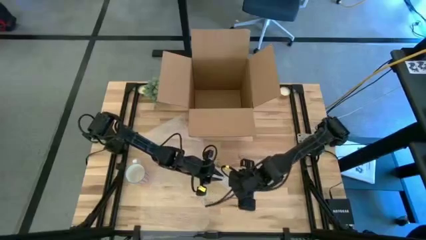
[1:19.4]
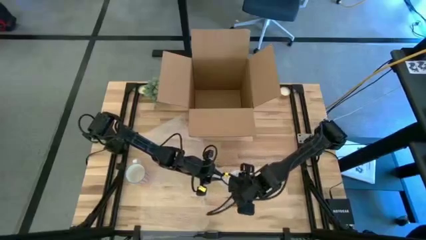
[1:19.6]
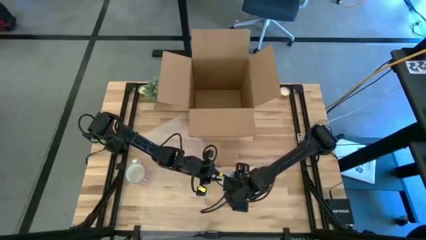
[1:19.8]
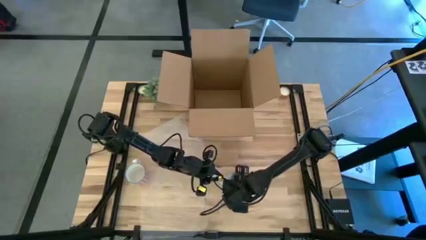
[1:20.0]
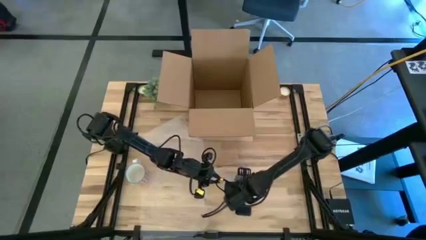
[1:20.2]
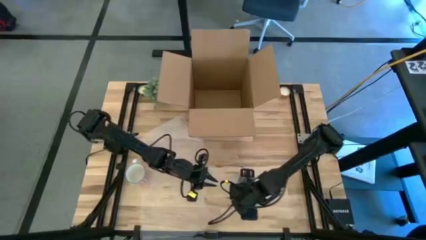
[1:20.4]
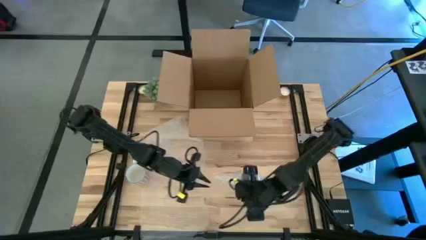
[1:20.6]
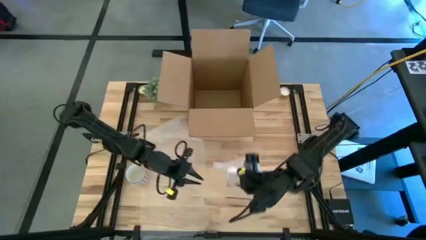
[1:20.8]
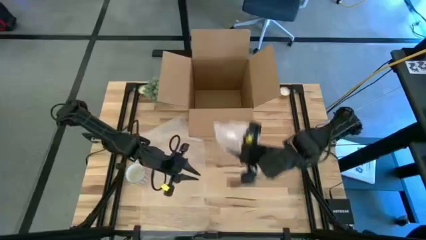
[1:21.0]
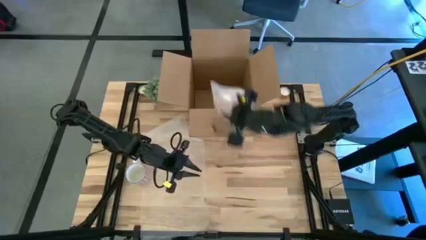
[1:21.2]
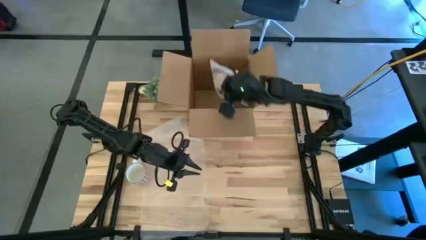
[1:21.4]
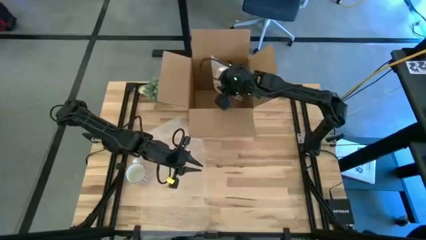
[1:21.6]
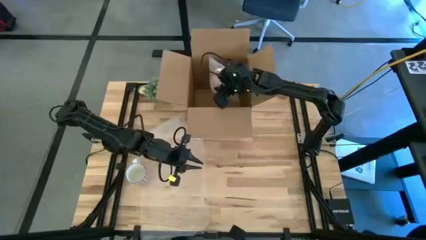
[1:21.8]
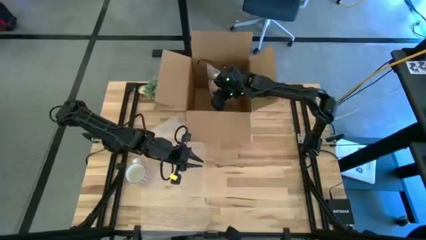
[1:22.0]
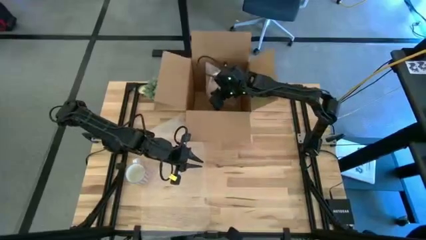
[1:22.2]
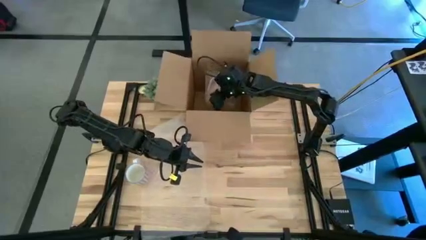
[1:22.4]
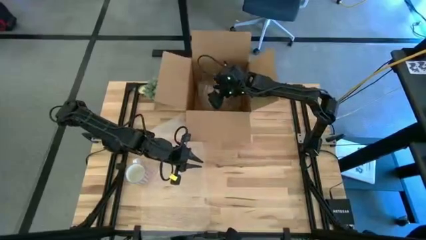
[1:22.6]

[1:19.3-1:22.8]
Task: wrap mug
Put the orange mug into the box

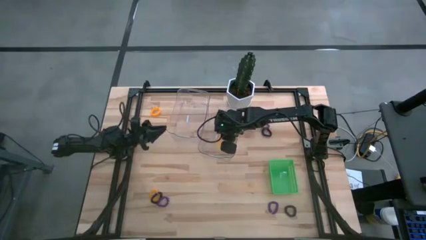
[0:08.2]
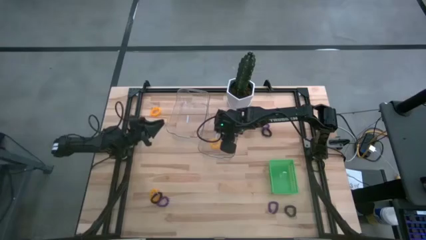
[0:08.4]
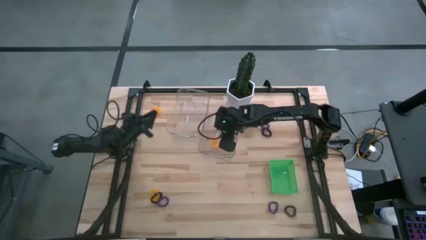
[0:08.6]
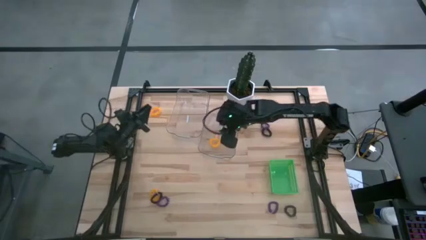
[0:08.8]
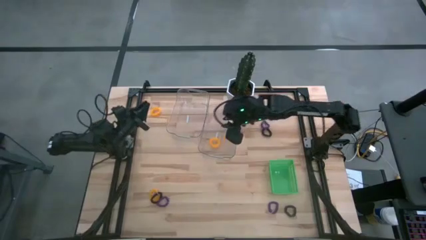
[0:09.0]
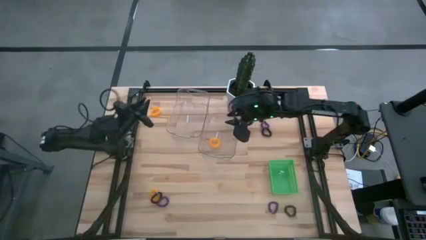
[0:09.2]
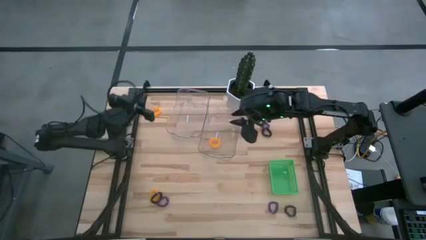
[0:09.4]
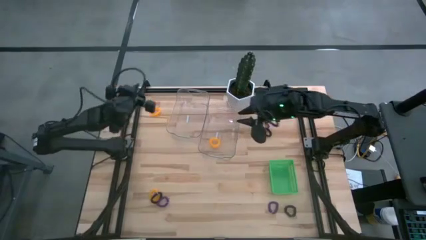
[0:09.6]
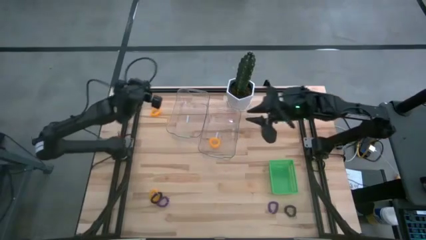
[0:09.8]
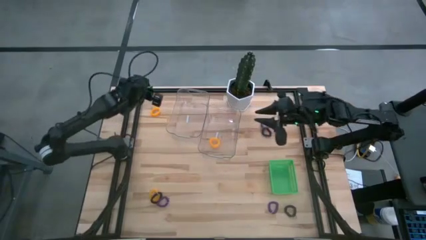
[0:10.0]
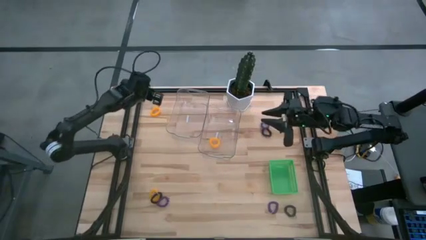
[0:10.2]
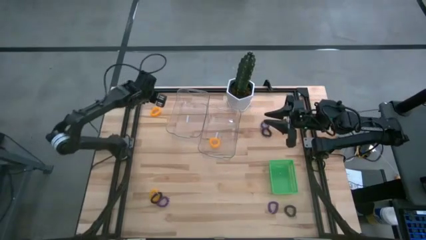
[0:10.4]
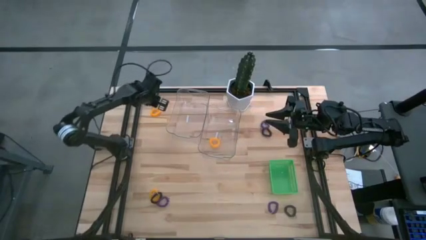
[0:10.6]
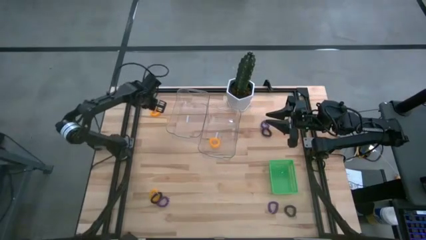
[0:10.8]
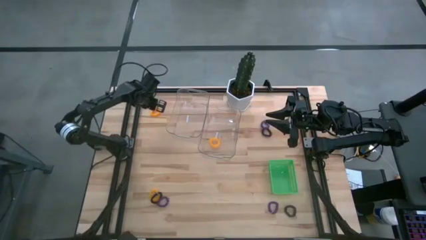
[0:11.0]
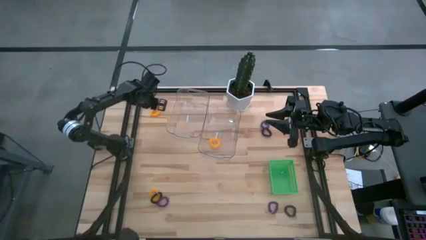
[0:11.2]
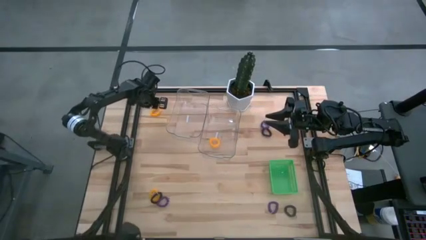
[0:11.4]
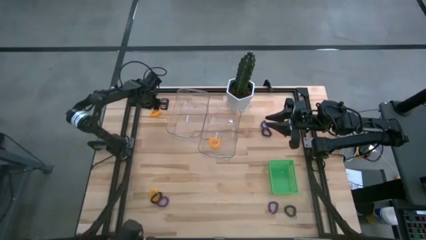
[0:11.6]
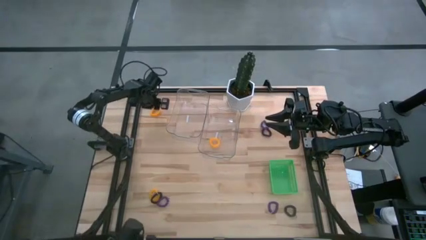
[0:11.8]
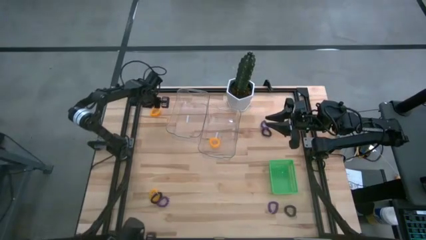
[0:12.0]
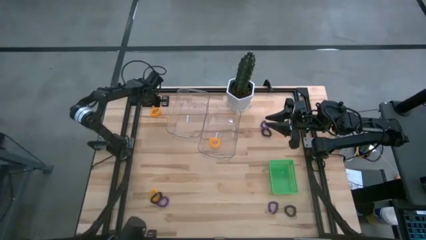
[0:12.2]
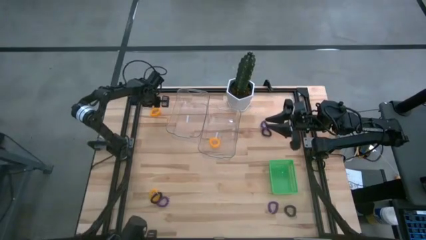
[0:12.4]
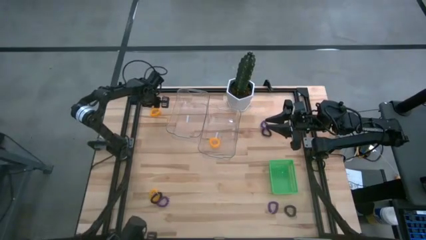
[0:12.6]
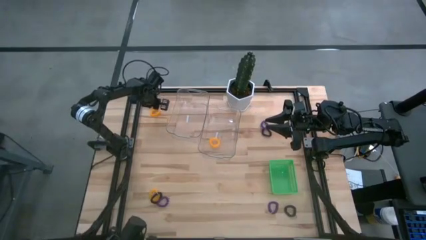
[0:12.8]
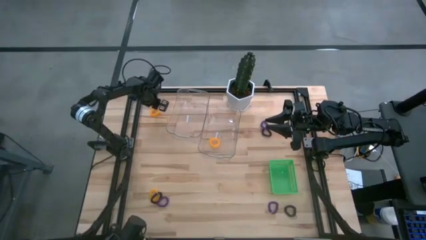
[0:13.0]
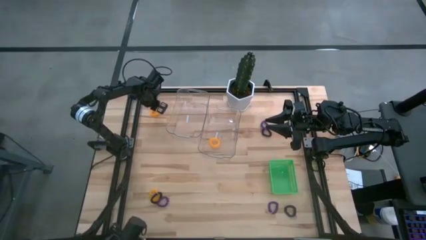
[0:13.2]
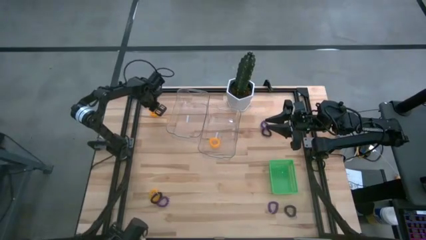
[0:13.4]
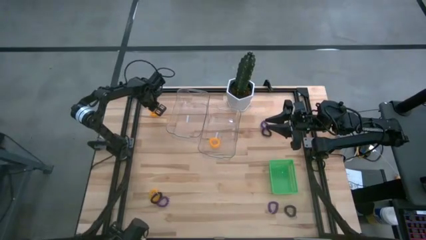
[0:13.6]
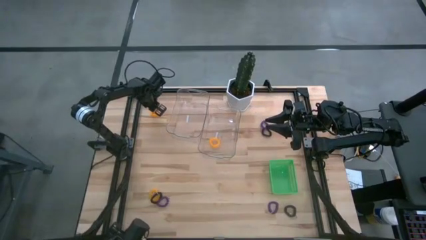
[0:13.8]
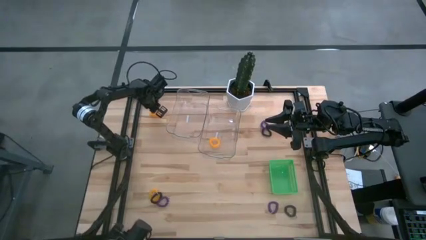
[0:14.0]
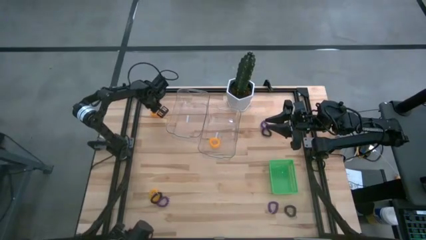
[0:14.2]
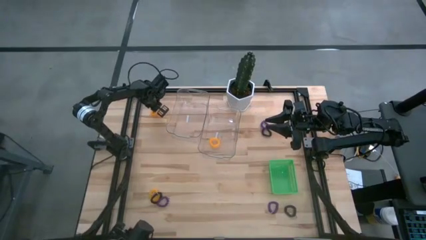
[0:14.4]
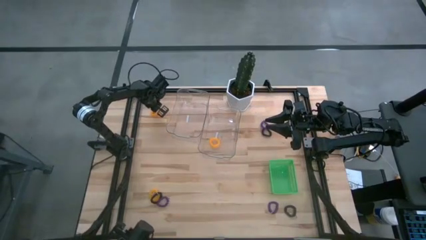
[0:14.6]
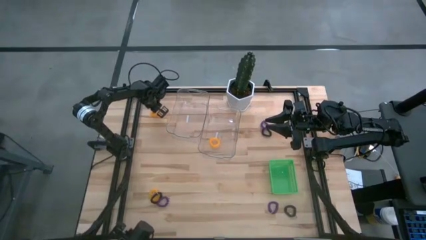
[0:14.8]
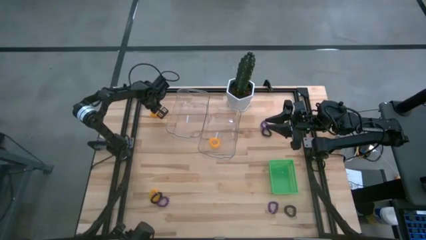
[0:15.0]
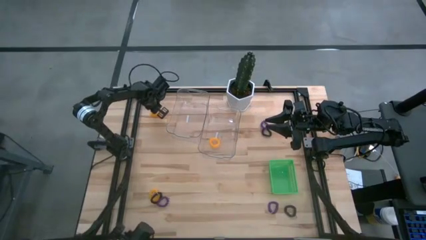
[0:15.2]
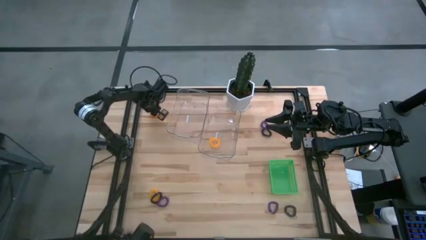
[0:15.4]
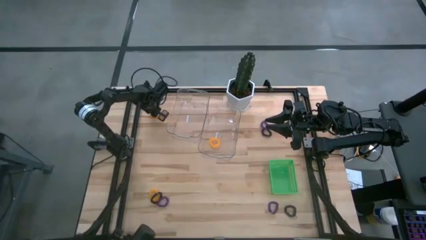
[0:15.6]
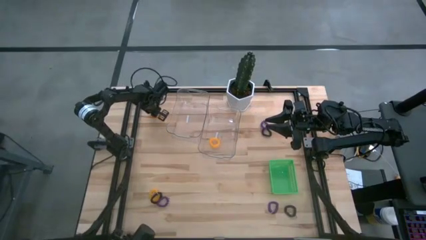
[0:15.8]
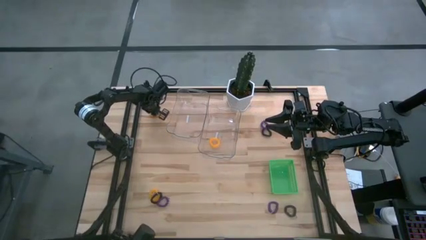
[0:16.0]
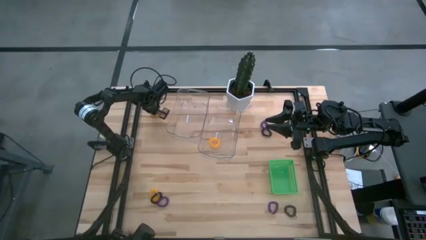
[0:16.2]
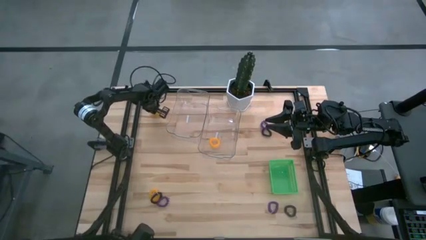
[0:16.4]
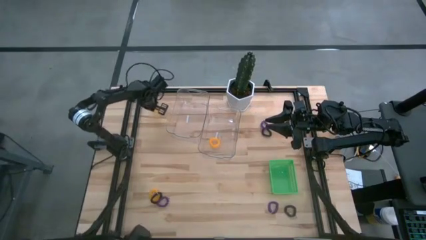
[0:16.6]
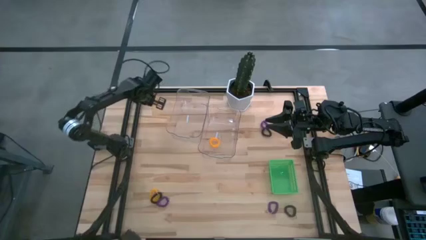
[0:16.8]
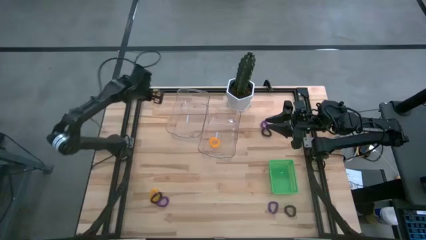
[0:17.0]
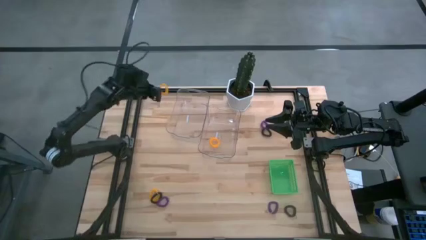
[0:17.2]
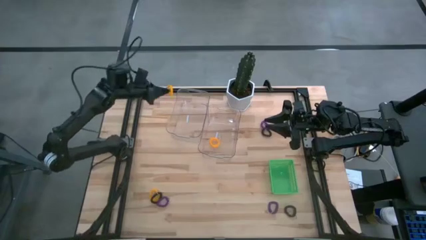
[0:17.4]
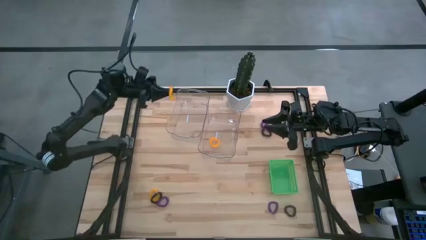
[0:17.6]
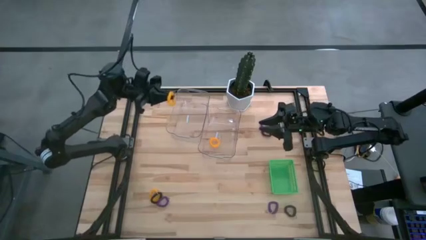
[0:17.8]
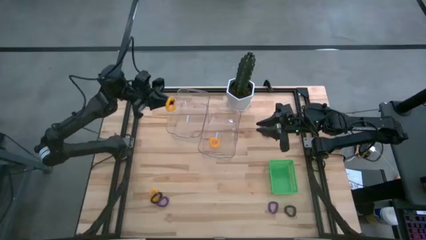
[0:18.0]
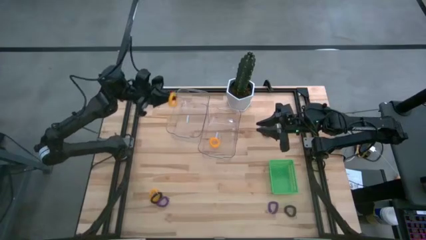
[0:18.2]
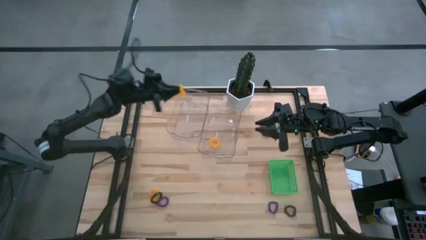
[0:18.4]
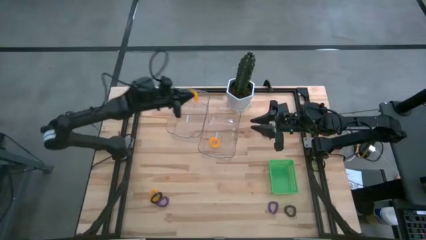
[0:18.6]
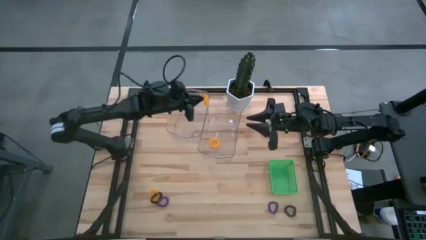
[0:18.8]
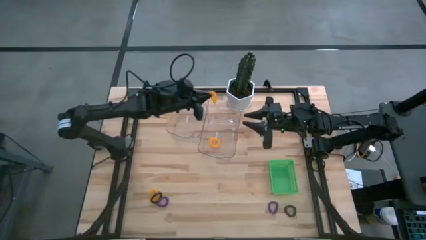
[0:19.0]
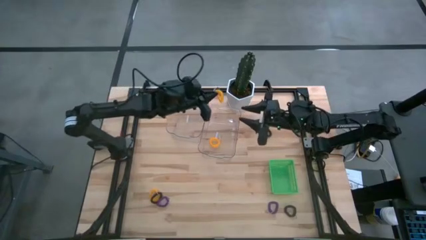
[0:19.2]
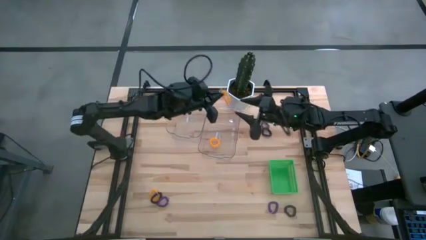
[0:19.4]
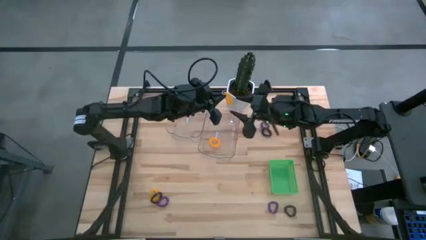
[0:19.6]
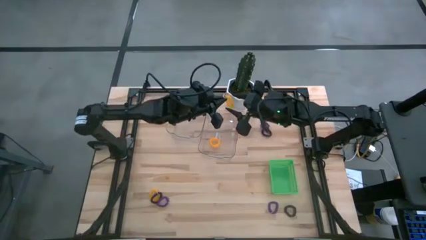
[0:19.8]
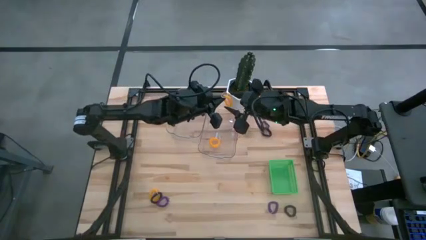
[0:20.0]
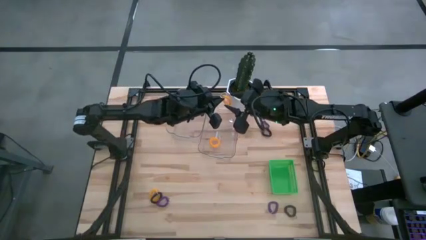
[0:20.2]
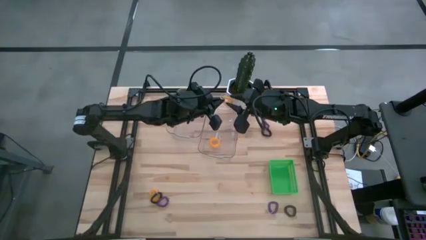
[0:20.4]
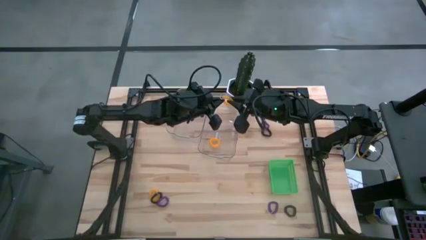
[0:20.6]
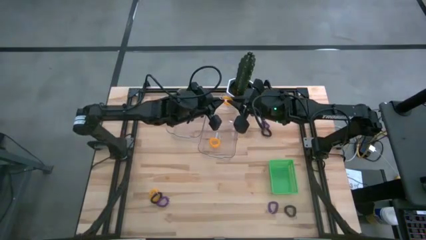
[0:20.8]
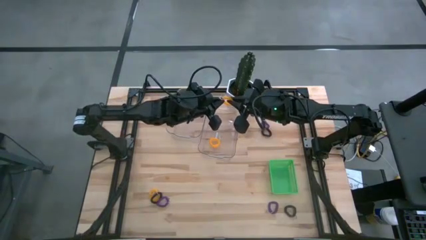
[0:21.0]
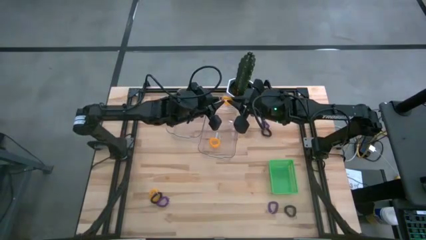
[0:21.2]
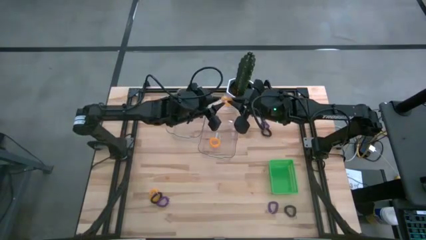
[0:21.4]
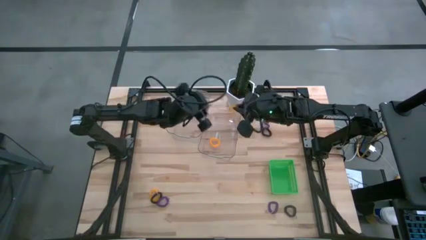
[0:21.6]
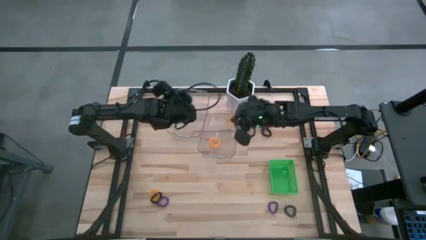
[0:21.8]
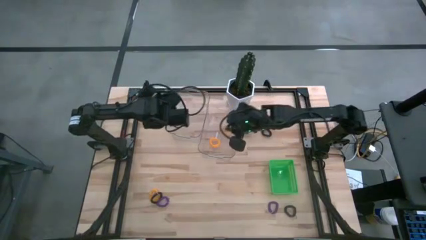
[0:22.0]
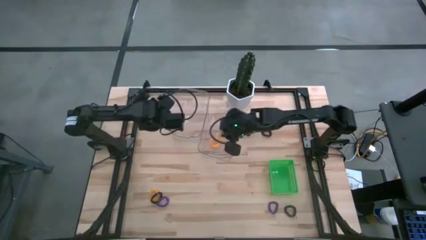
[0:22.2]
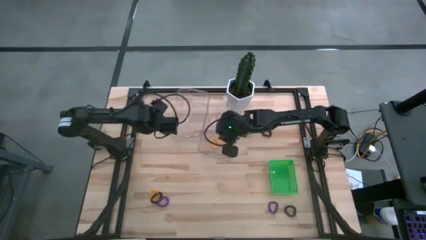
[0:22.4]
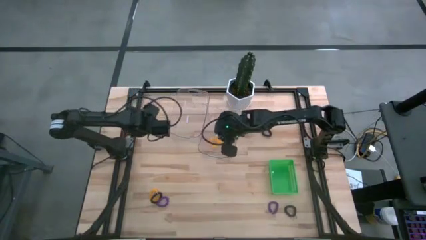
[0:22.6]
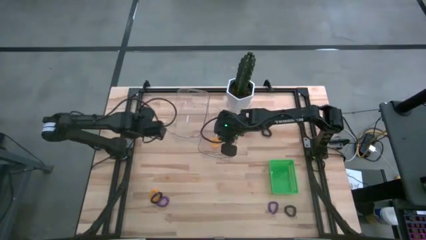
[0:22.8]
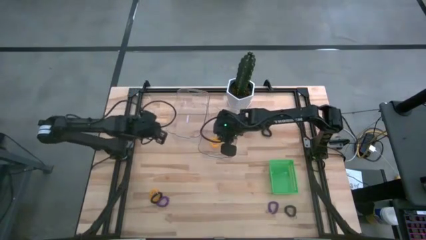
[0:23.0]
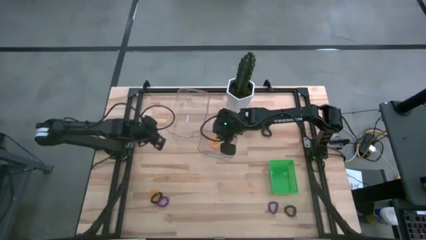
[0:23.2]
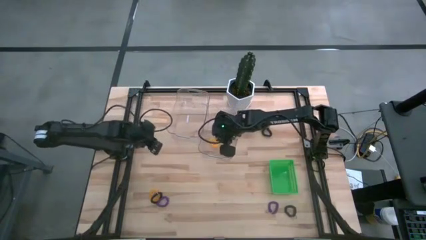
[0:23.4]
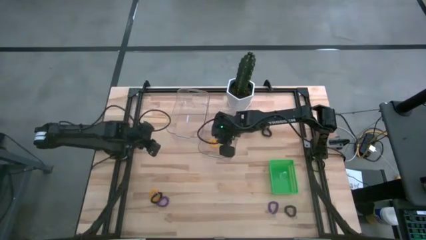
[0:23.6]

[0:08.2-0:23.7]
Task: Sort spring keychains
Put the top yellow spring keychain into the right transparent bin
